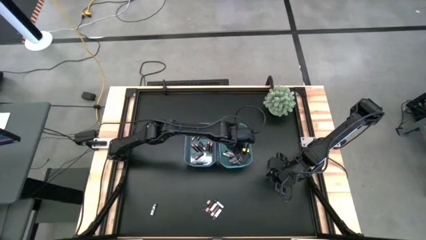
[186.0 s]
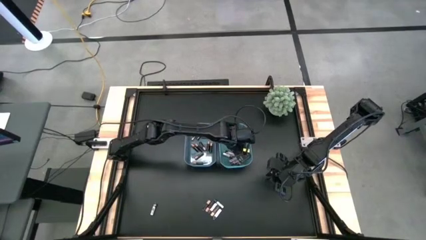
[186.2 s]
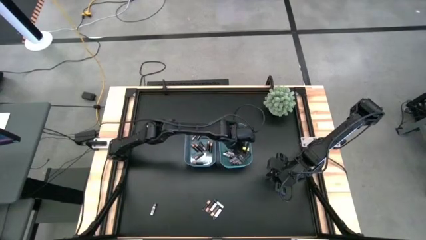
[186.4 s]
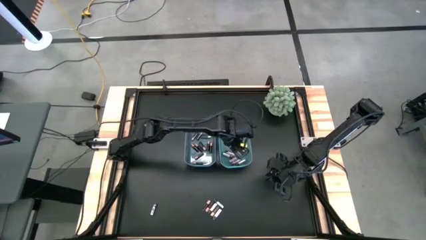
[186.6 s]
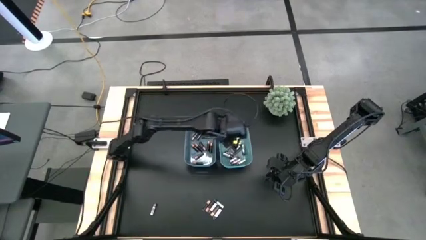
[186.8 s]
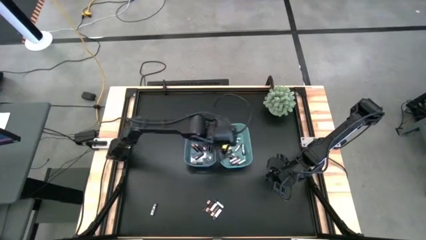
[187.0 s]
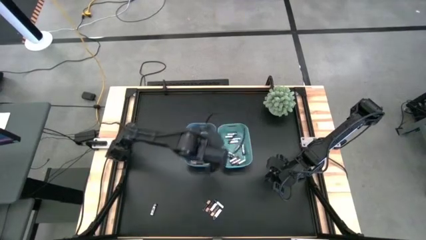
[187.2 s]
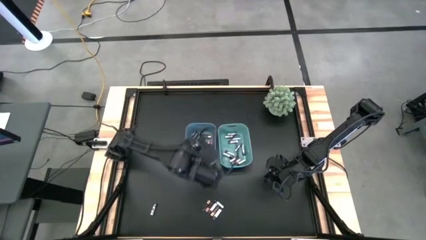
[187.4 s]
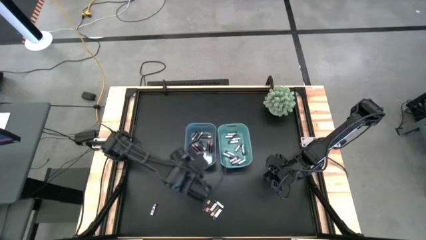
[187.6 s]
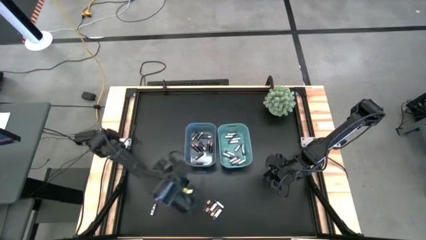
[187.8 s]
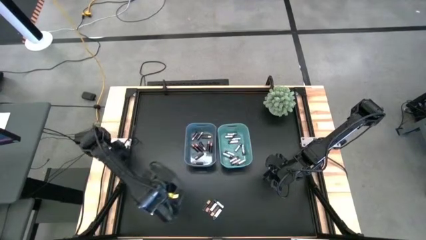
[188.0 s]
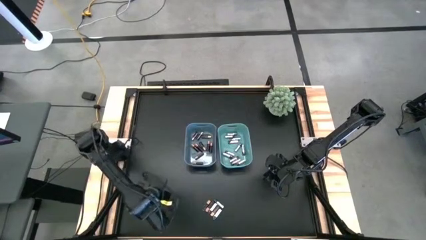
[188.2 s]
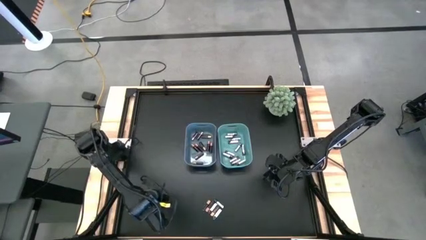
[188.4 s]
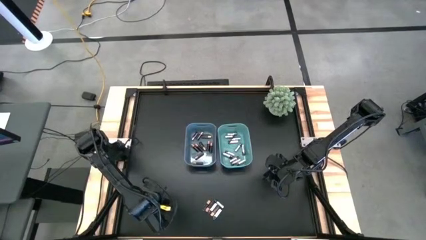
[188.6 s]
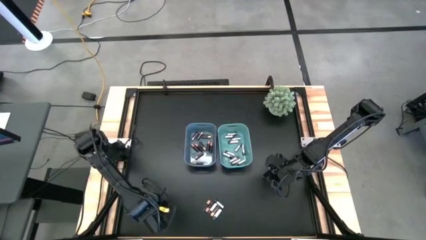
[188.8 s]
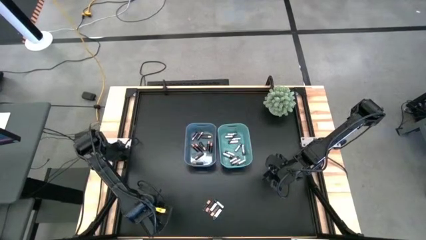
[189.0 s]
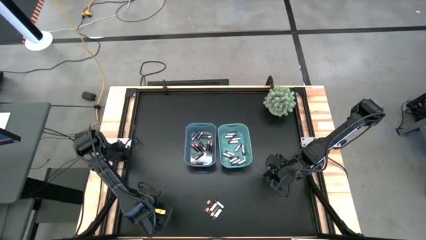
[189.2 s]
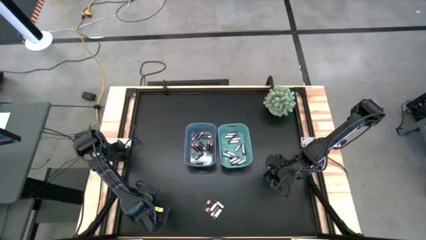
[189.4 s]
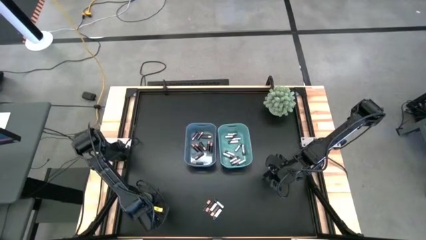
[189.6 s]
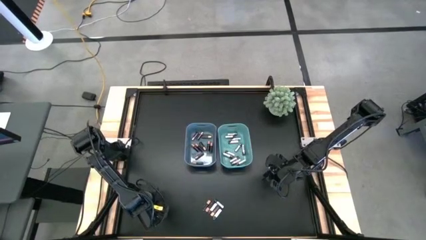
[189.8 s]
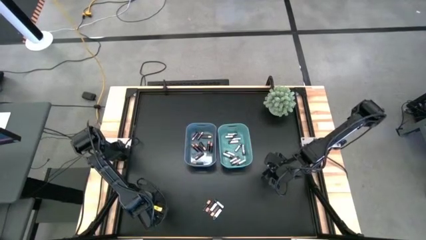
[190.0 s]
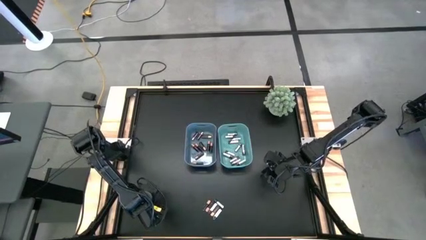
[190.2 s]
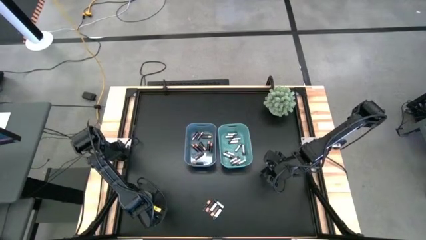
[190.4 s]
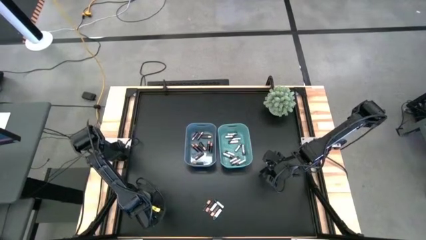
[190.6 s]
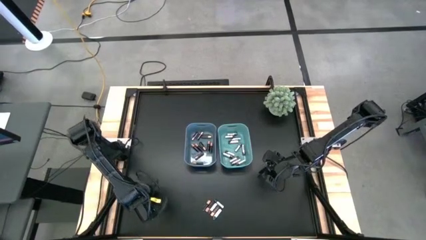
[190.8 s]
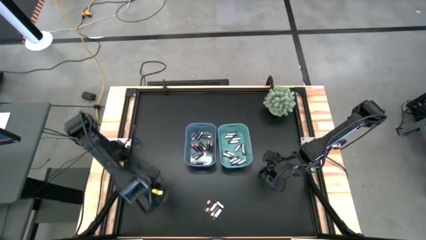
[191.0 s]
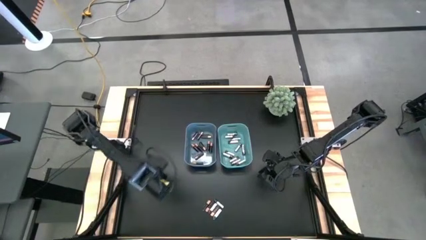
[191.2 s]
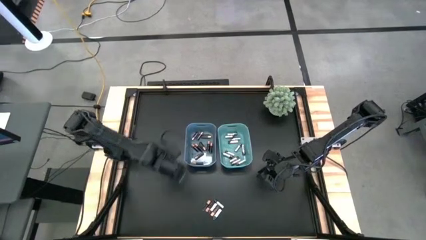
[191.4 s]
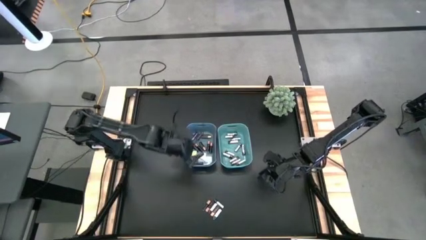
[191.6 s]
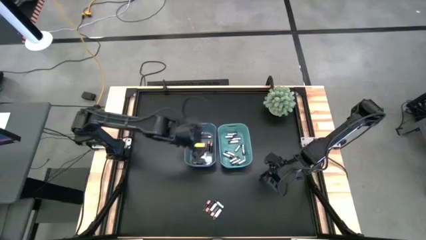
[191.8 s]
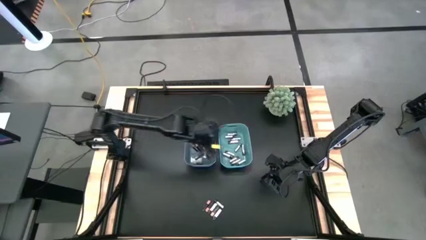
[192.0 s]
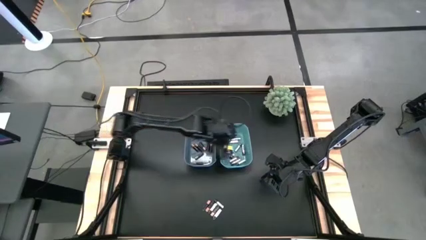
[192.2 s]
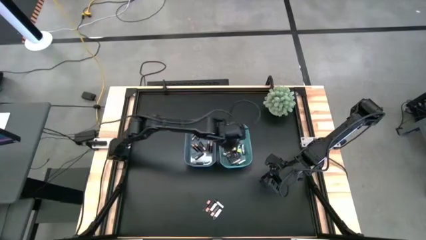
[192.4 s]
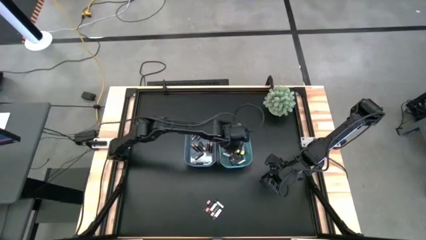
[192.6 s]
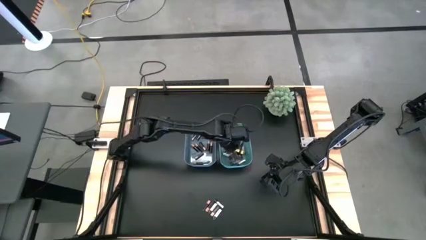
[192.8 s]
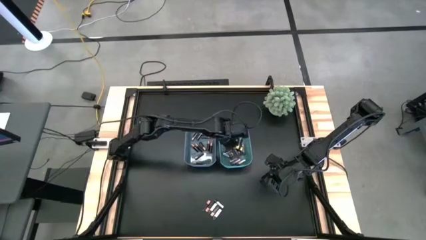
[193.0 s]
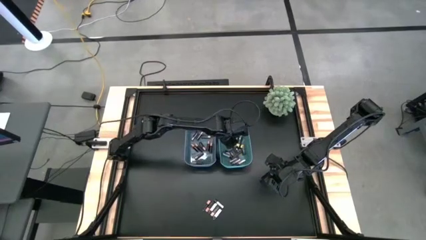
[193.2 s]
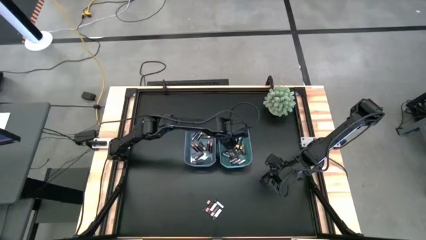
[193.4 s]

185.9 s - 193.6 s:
Task: Sort batteries
Put the white battery into the green bin

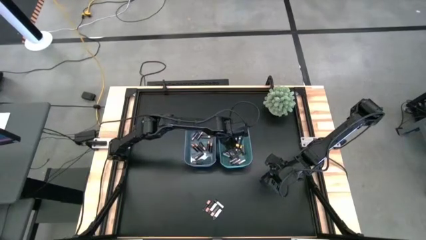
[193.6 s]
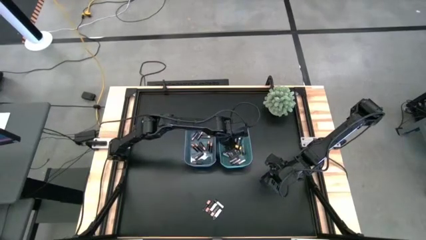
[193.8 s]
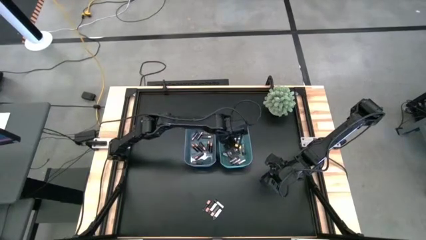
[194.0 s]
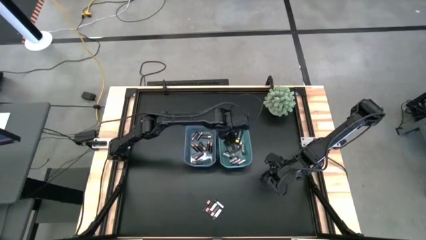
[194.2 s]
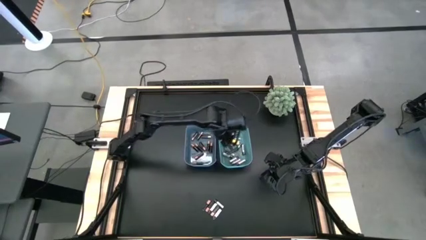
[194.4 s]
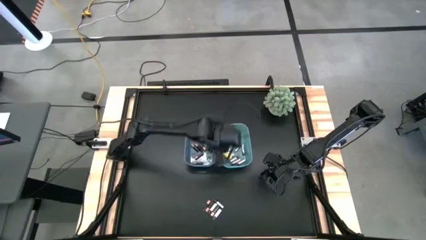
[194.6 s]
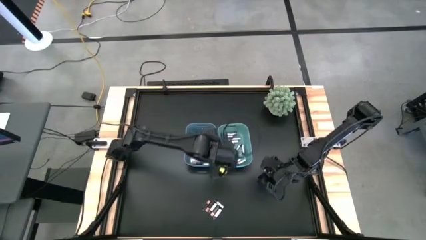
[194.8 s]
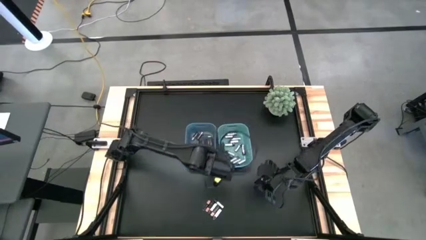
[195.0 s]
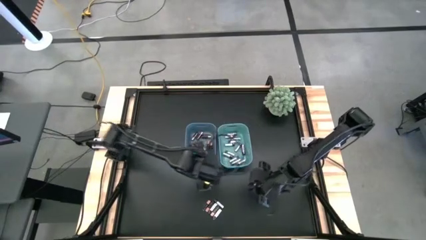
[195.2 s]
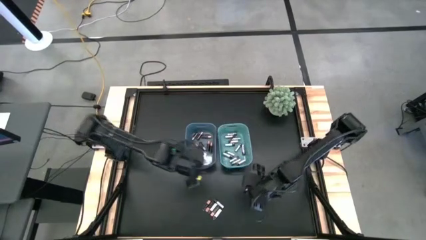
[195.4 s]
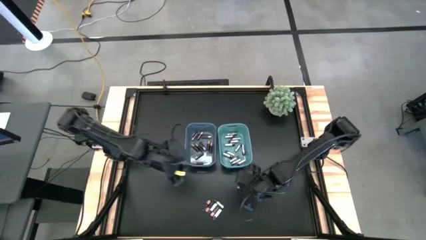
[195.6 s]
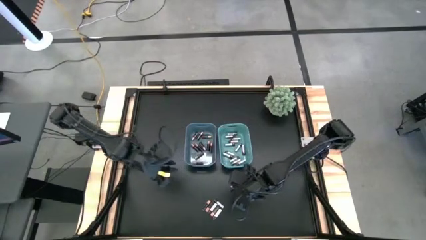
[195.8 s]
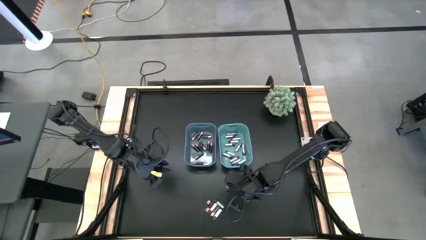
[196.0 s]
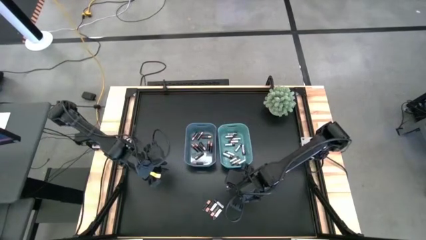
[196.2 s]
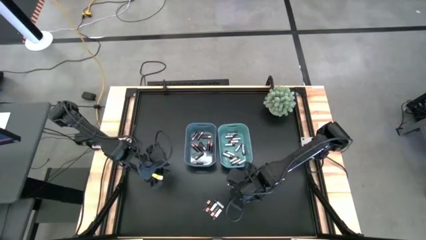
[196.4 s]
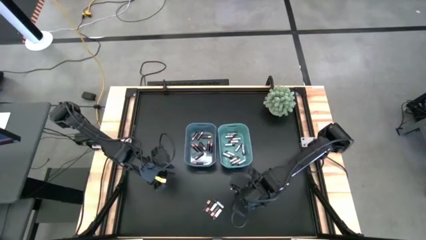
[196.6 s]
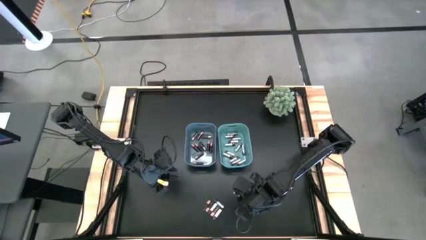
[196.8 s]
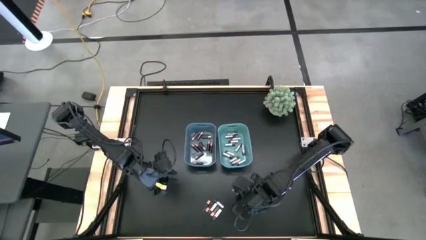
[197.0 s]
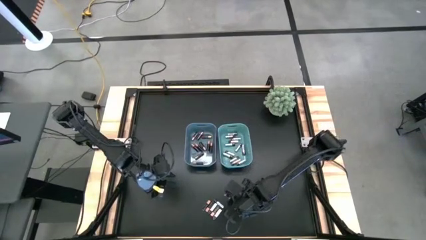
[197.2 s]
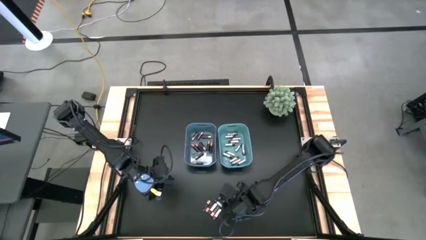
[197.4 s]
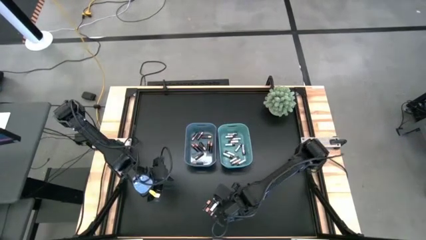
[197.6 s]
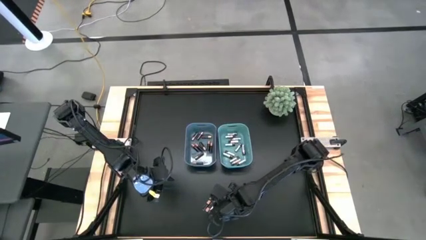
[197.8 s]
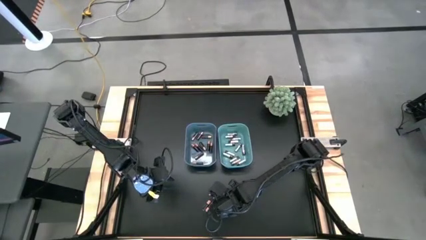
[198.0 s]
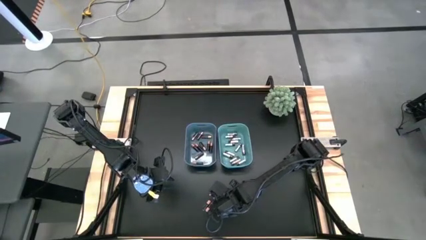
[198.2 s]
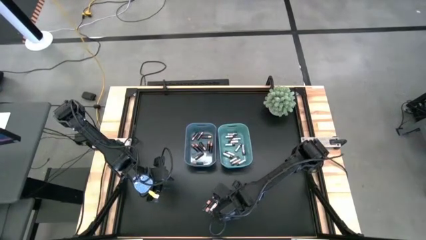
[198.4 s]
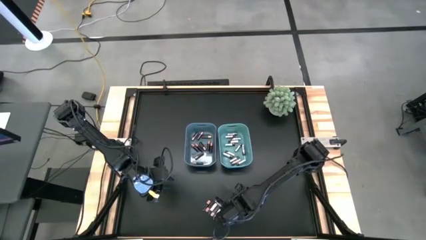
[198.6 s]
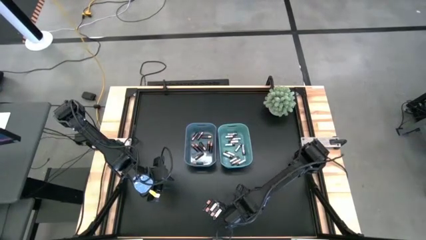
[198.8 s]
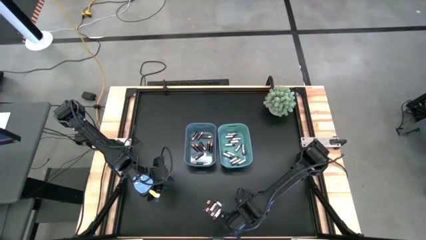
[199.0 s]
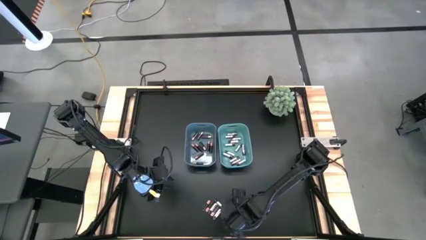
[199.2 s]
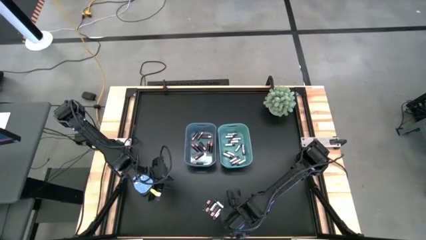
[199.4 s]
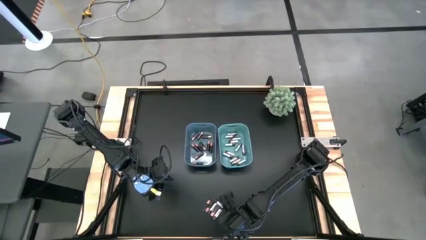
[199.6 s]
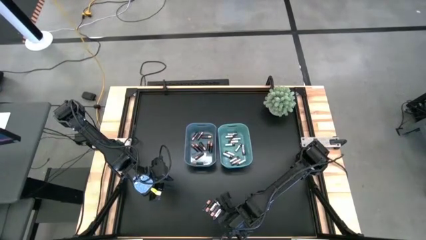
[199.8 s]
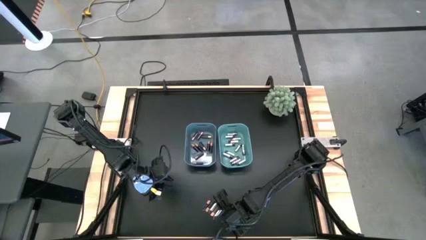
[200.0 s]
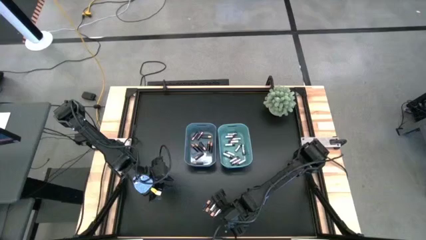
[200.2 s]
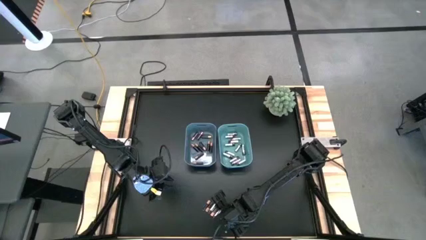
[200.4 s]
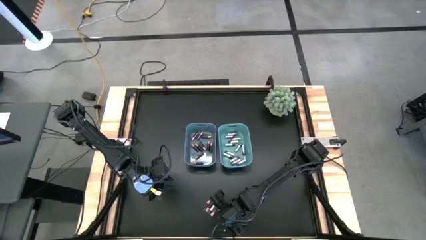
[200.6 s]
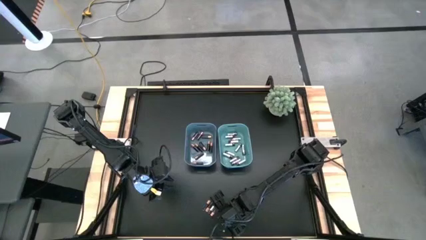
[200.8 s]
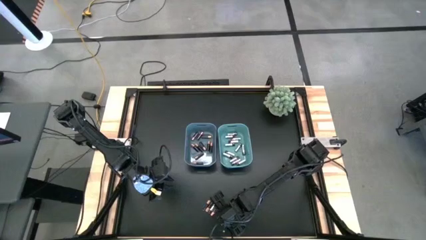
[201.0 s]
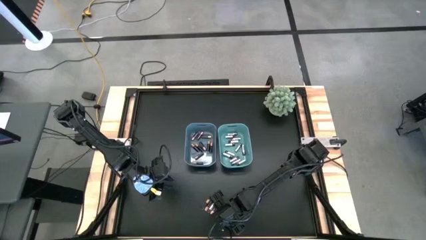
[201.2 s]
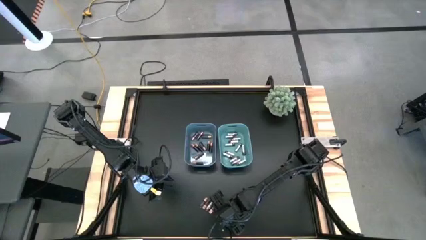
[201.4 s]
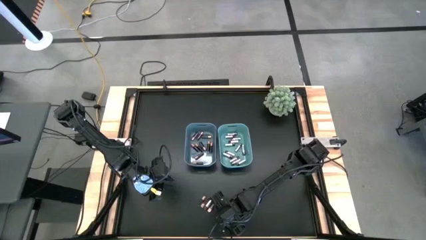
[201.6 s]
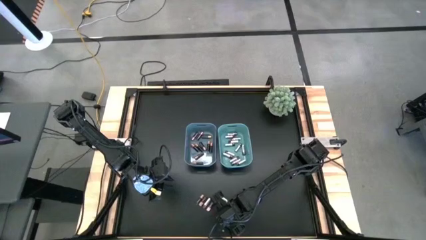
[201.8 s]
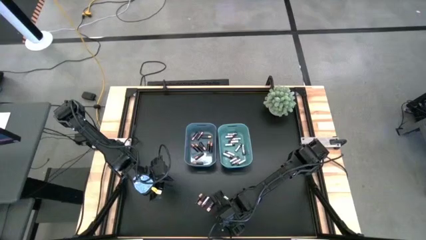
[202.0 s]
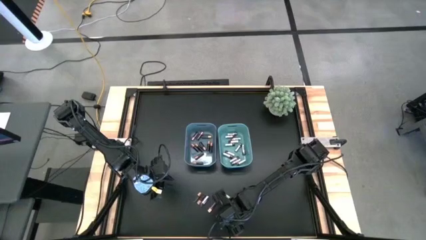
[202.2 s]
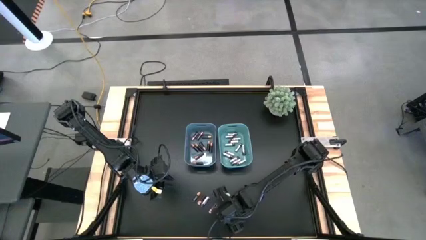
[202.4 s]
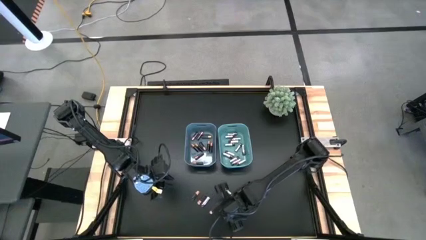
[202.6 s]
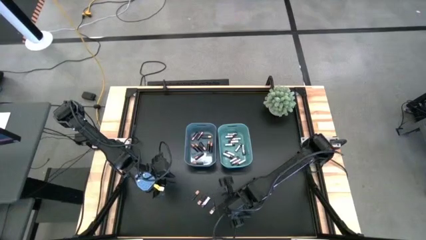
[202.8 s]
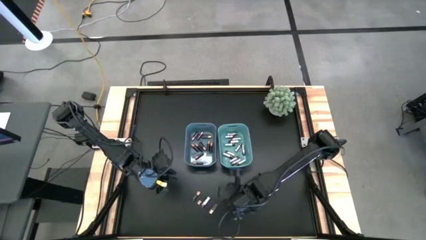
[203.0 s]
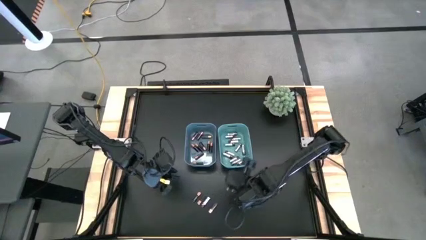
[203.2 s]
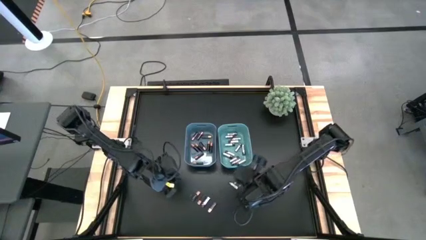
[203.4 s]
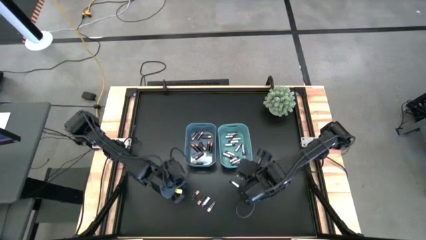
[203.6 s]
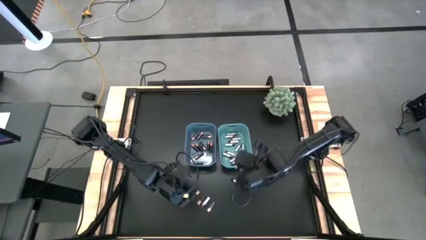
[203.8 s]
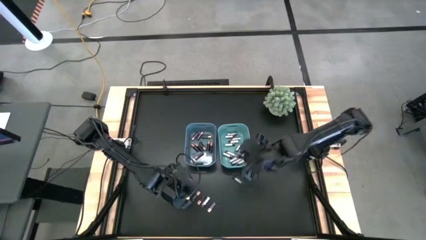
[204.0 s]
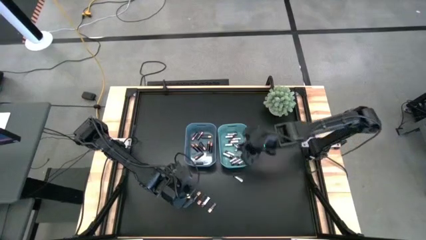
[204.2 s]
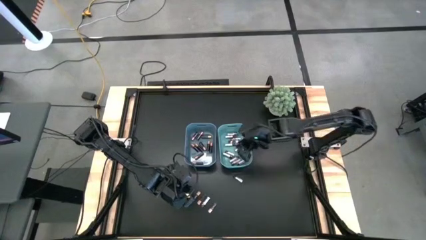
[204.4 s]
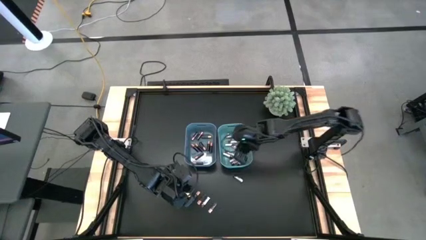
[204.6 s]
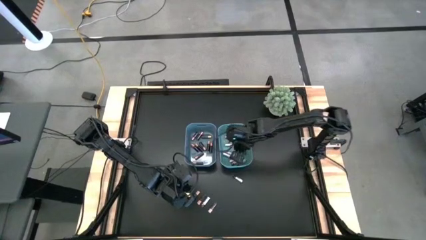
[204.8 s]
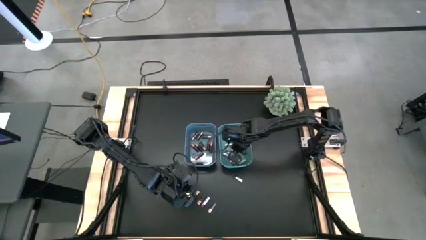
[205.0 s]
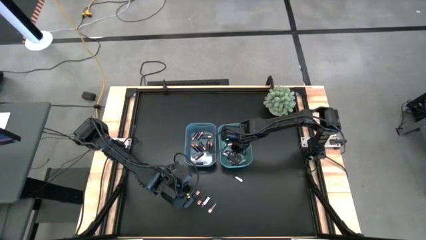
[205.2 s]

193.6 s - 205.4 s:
Put the white battery into the green bin
